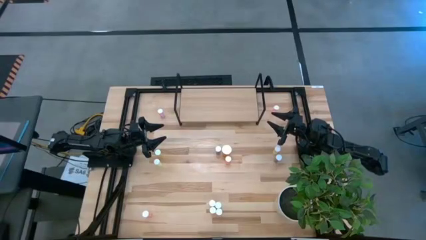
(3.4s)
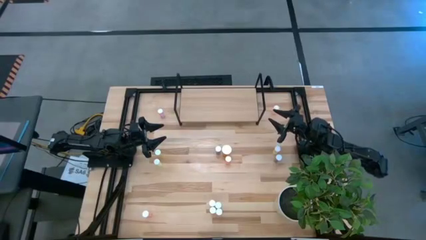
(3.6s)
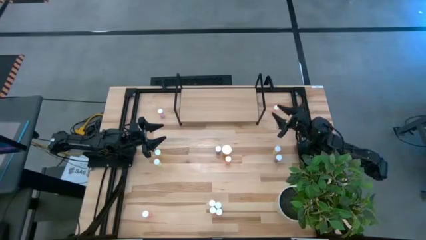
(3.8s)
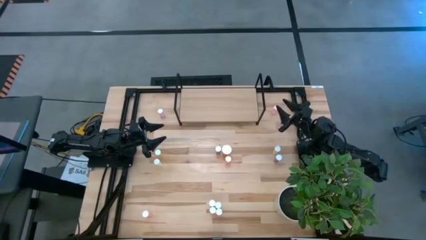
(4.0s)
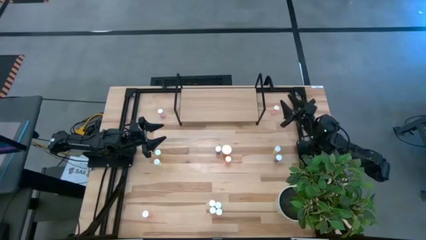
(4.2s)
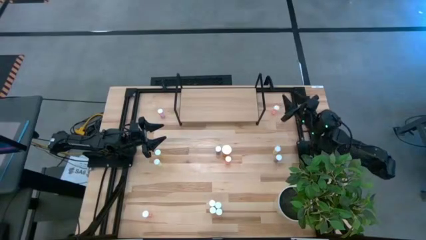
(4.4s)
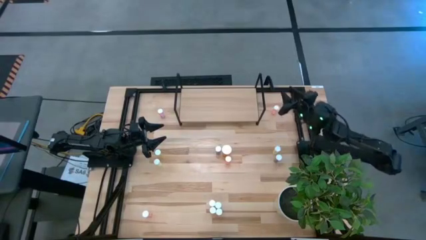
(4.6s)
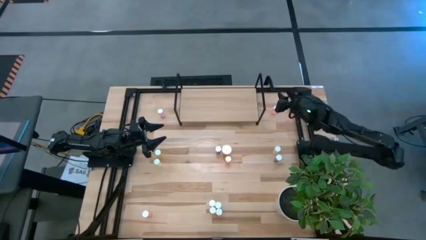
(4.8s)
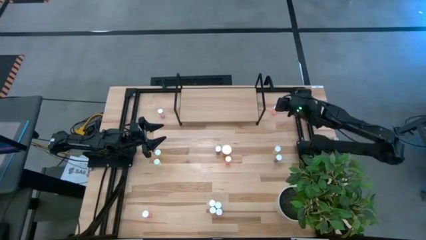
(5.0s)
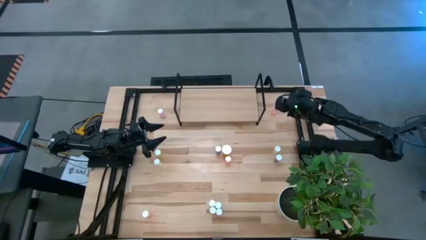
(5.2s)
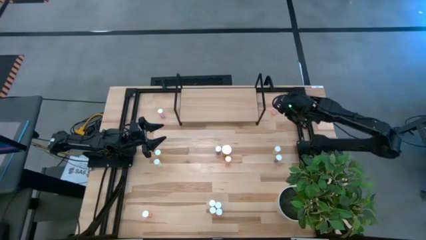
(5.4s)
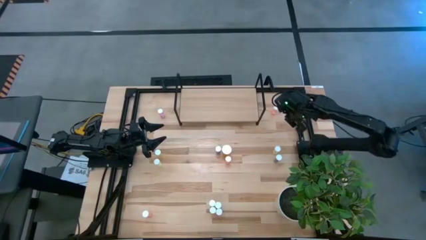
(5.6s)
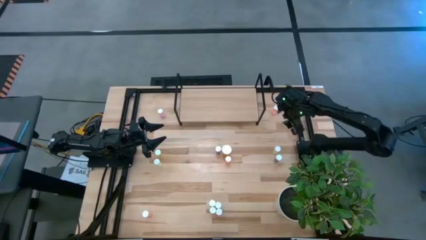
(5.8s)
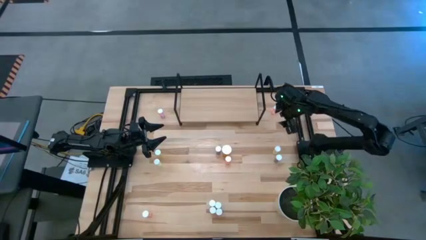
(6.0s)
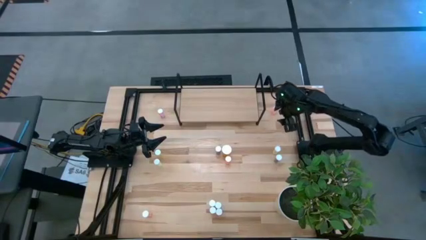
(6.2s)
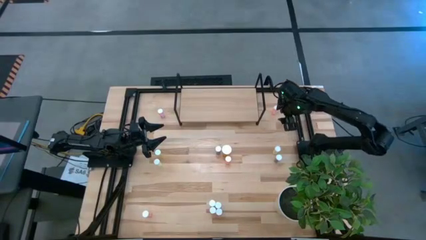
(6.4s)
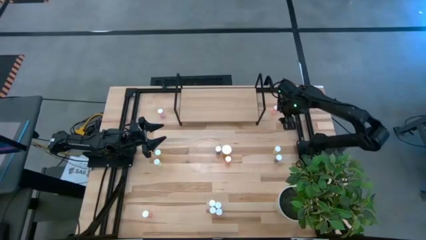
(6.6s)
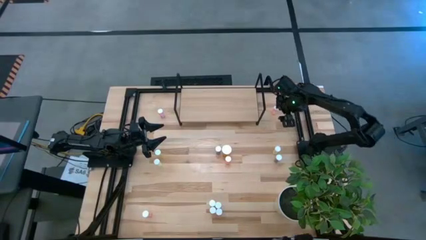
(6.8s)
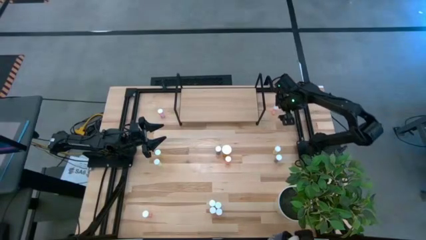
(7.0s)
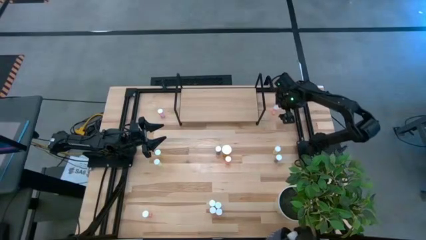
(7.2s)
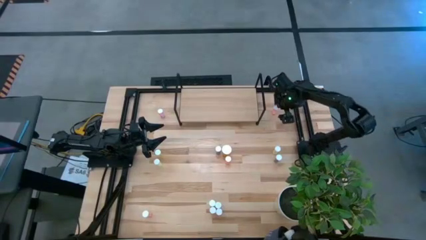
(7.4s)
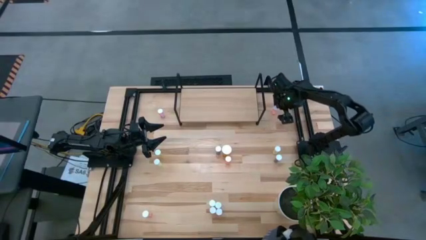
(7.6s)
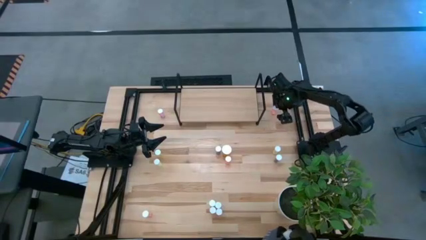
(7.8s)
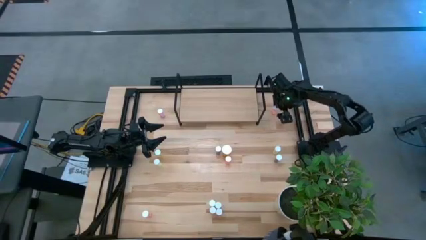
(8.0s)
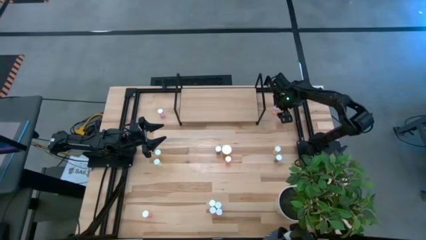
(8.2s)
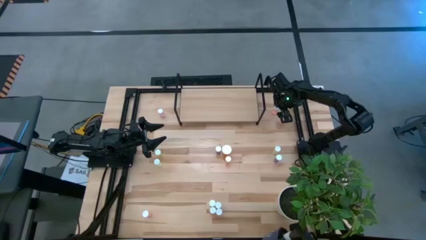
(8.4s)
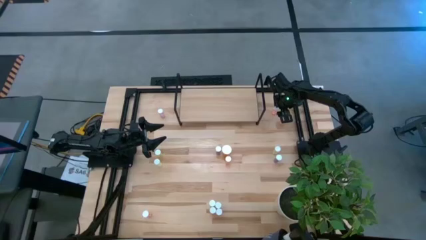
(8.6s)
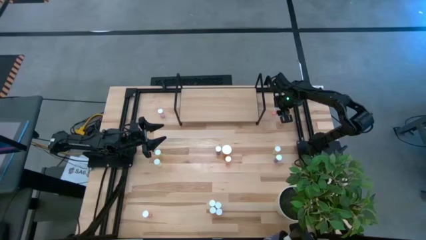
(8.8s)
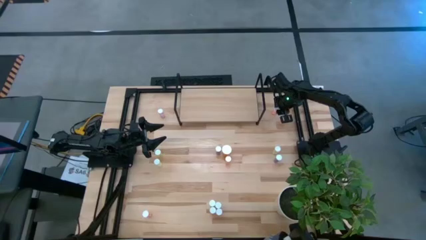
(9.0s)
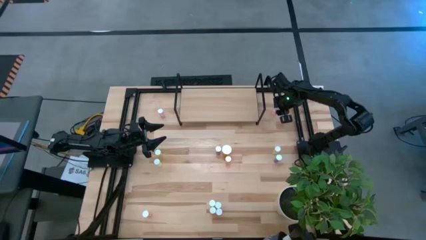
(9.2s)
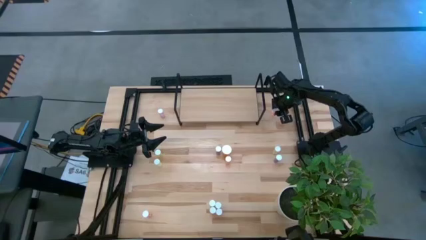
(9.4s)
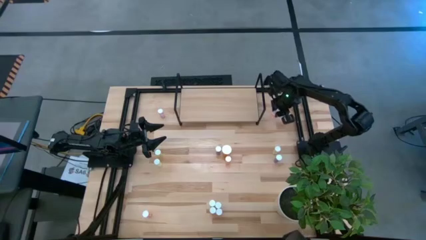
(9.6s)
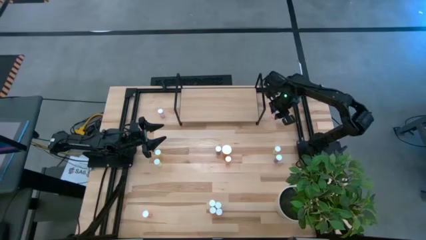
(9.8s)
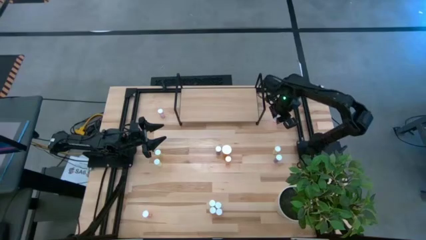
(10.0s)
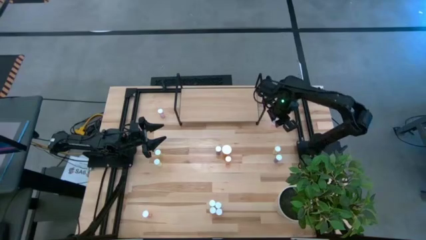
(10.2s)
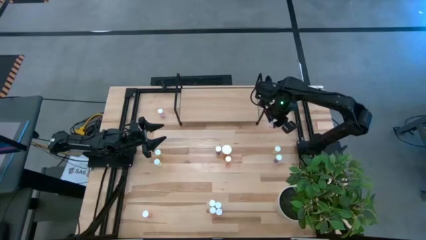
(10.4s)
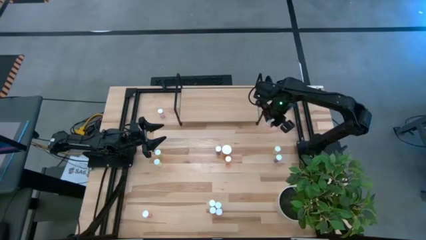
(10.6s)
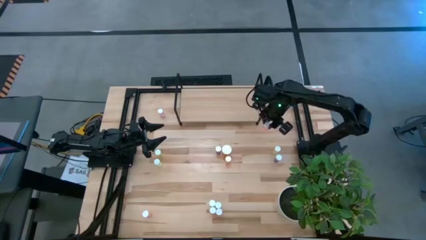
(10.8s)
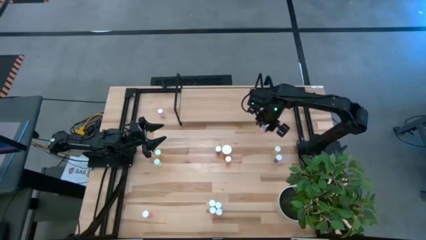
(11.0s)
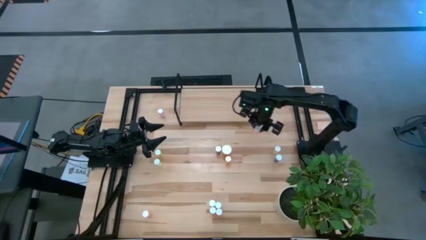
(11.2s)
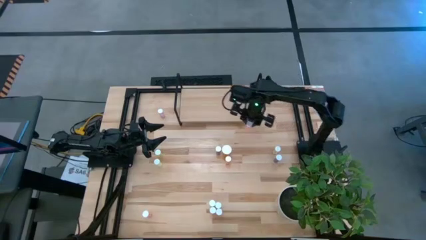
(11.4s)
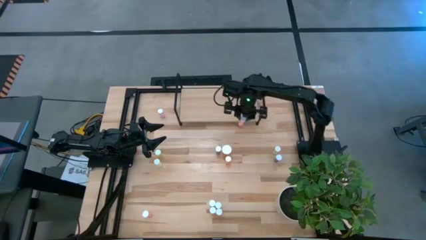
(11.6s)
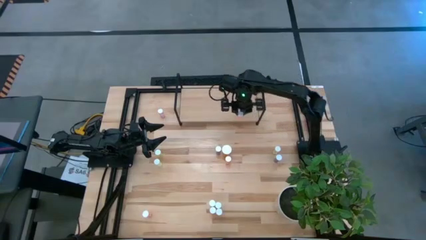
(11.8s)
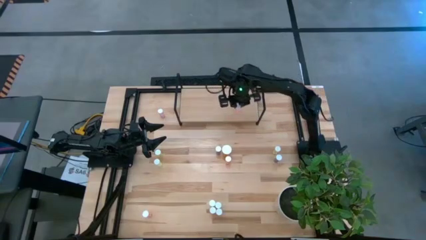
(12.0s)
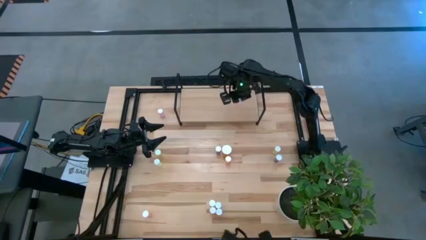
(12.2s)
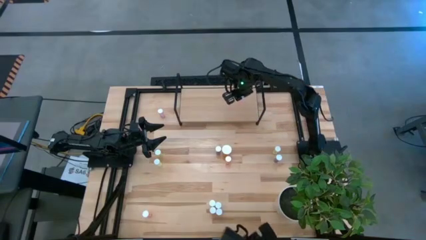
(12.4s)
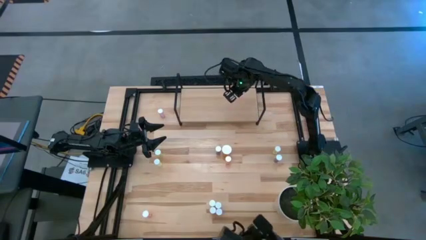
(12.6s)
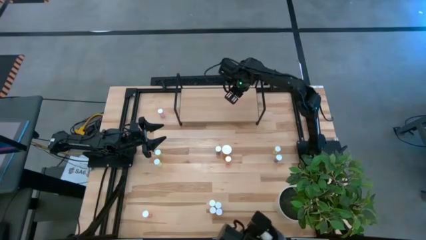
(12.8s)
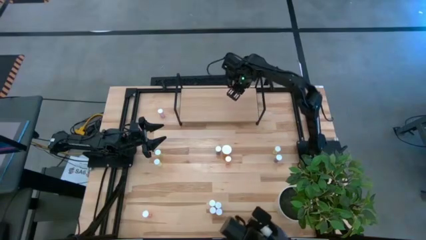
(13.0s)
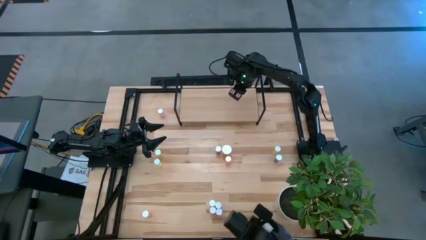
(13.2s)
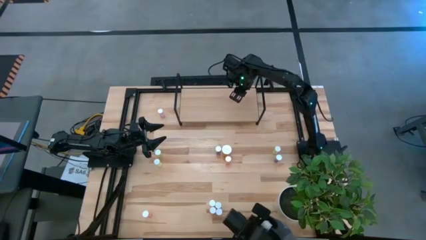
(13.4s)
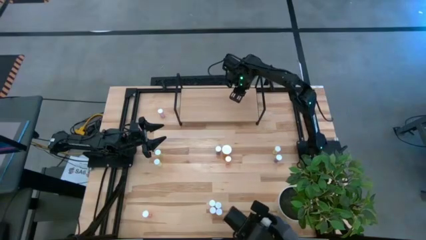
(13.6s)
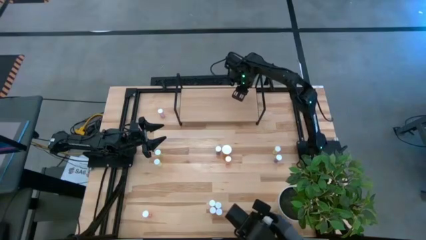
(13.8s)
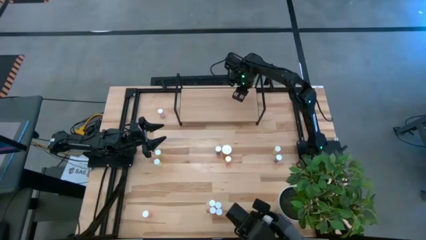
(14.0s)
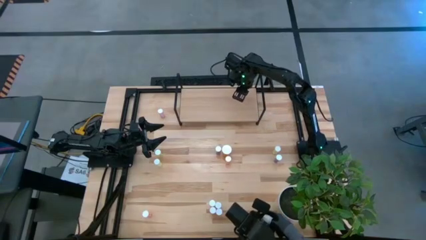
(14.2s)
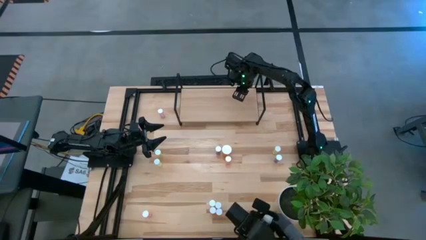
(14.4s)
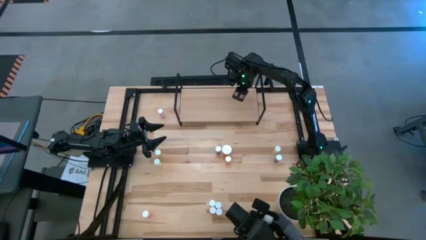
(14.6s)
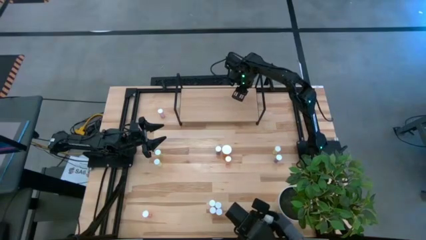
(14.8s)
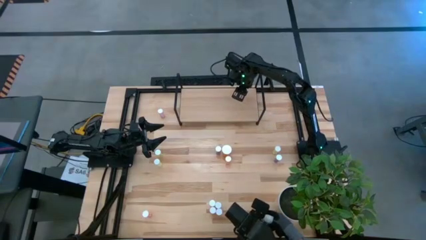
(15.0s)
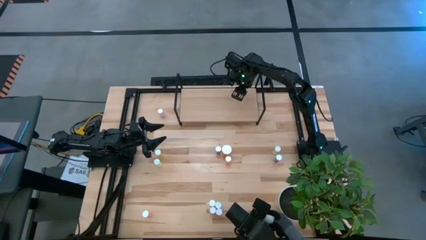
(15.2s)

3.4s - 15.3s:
Task: Pick and place medicine bottles onto shelf by color
Put the pink pill bottle on the shelf

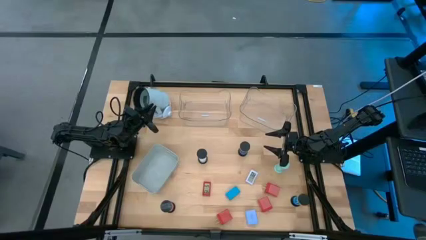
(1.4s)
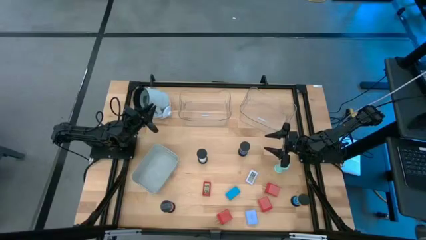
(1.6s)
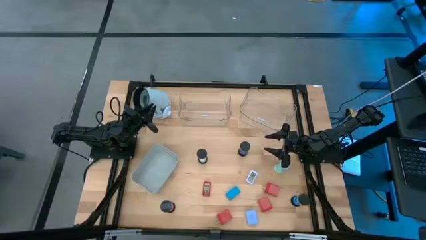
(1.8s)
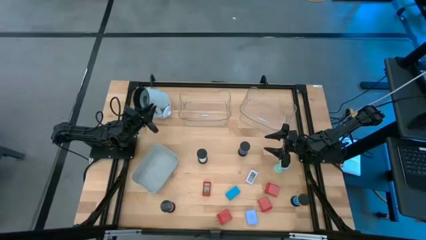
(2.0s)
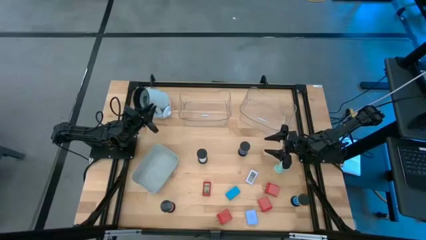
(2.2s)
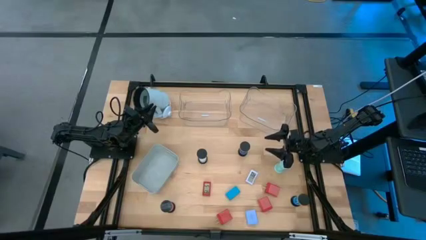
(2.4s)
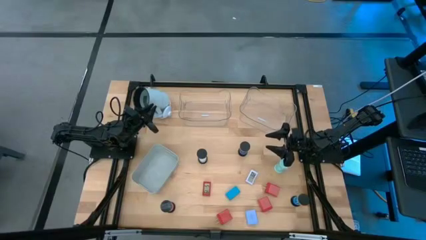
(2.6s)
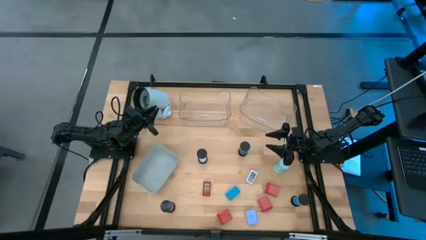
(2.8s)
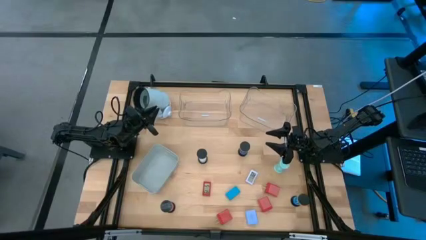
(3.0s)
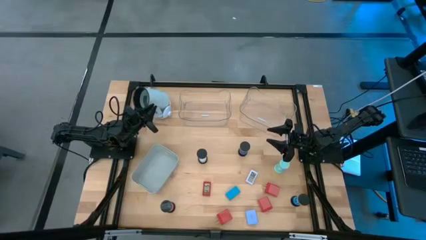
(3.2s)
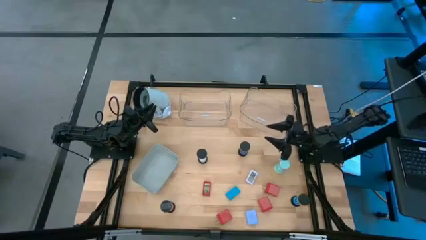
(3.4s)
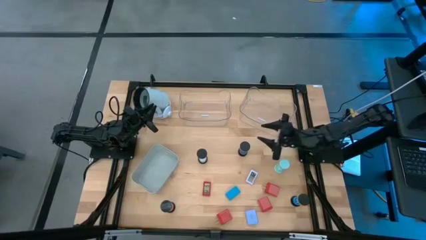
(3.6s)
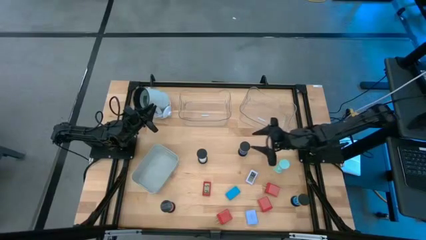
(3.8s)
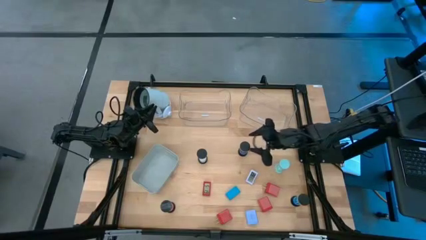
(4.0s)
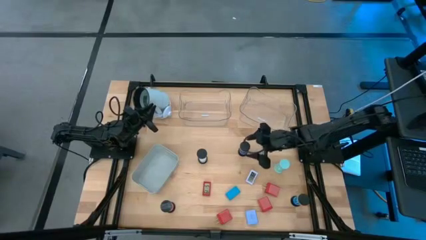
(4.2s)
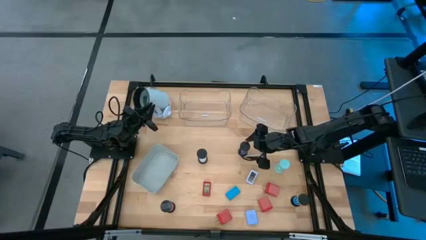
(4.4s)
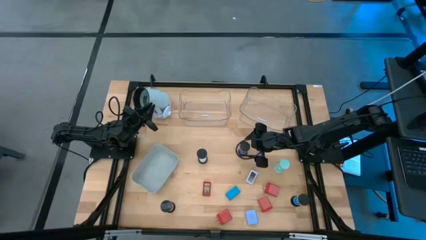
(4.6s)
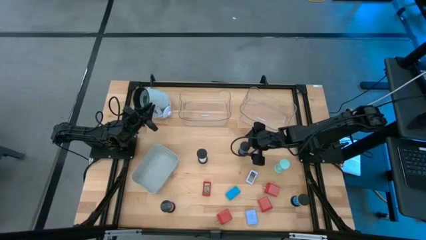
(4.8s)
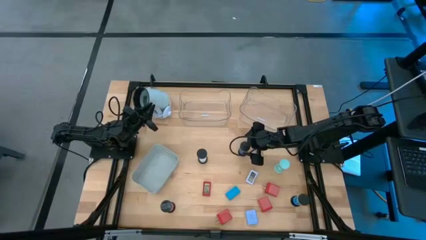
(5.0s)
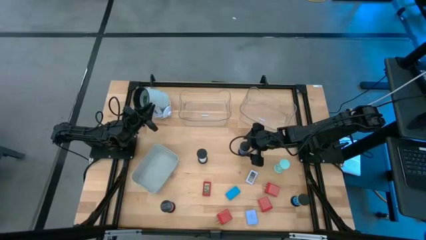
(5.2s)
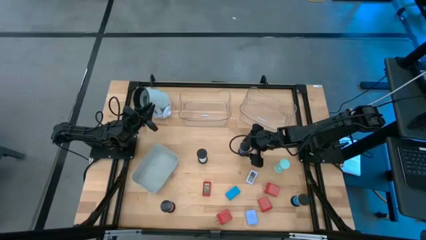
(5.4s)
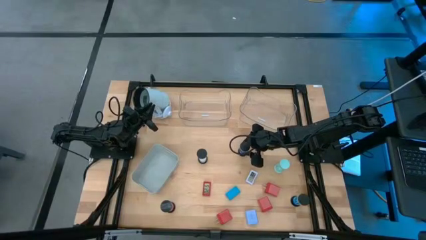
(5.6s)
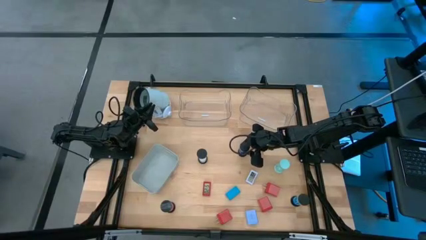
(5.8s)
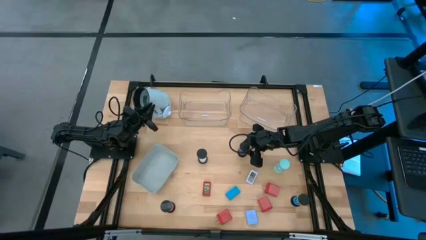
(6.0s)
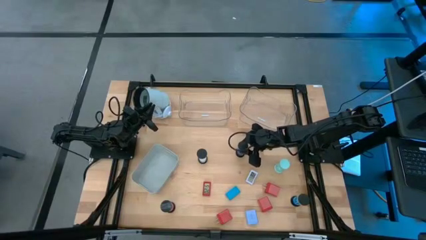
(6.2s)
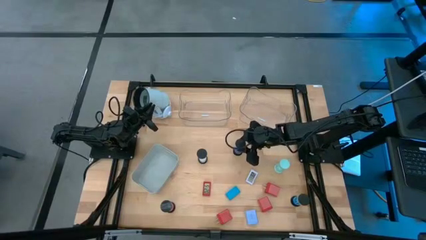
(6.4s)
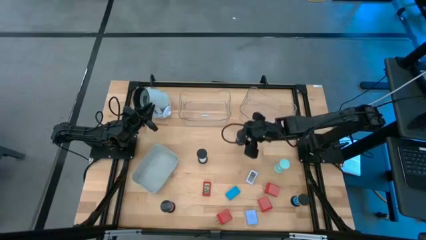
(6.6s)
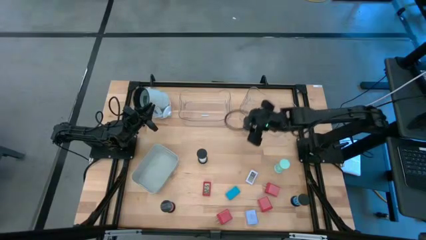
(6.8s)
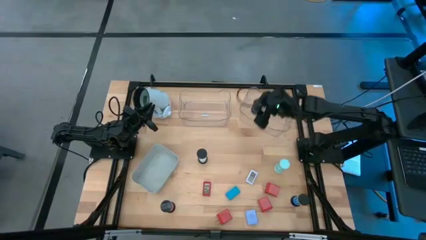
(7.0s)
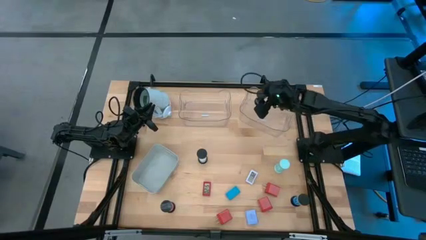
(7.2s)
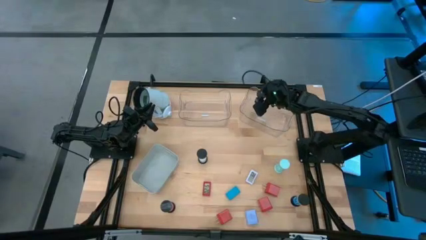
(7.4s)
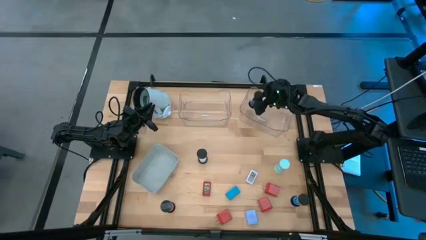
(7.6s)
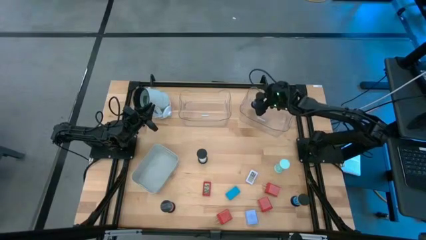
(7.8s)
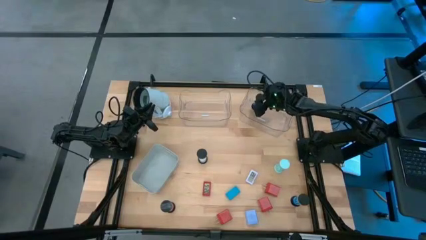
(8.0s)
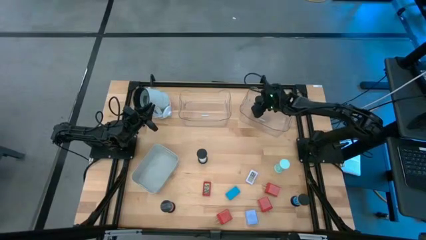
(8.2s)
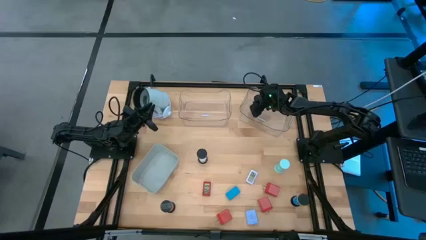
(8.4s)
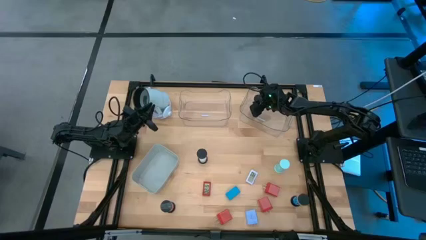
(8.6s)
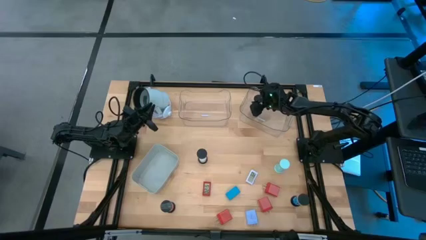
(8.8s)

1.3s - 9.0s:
Task: Pick & Place Office items
Put the dark blue hourglass into the right transparent bin
